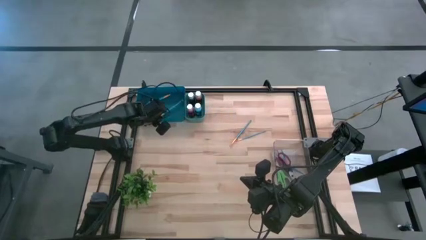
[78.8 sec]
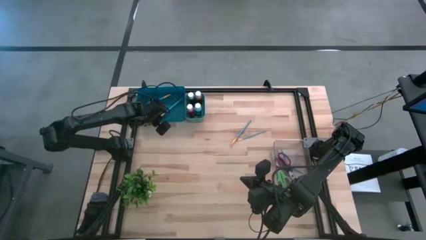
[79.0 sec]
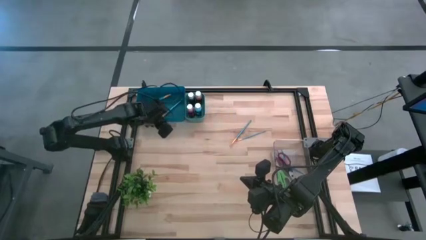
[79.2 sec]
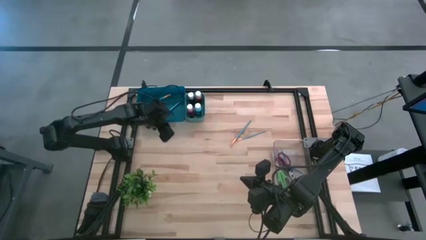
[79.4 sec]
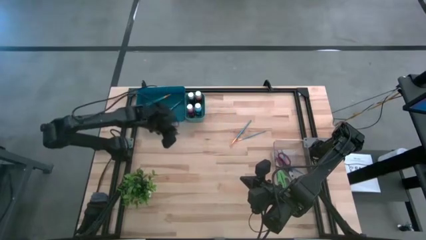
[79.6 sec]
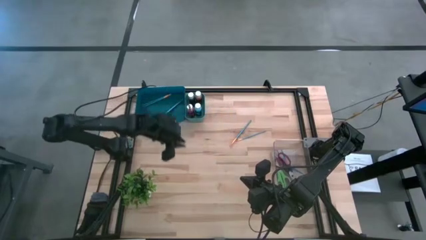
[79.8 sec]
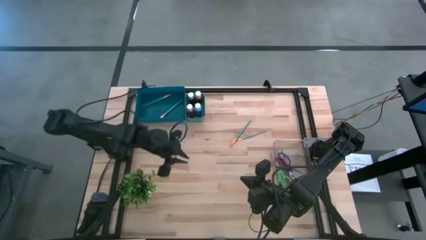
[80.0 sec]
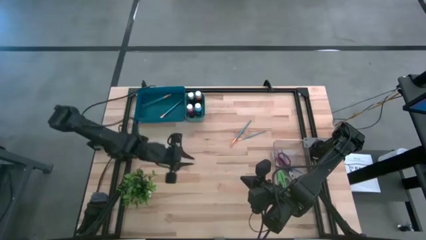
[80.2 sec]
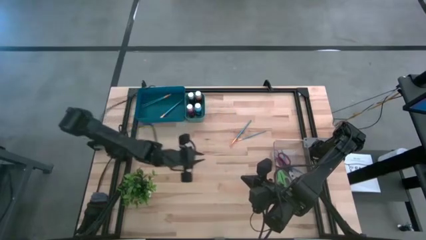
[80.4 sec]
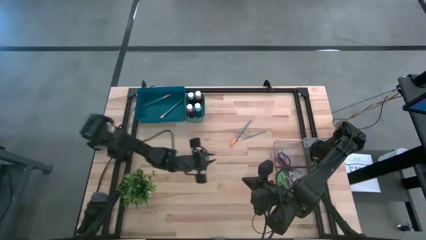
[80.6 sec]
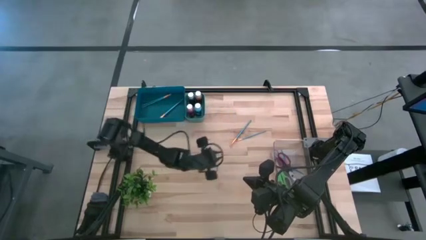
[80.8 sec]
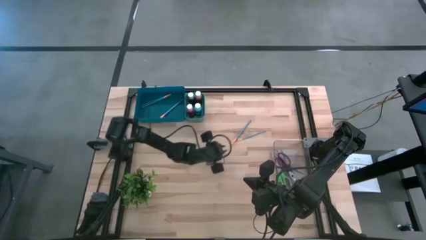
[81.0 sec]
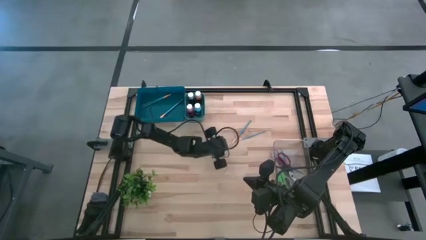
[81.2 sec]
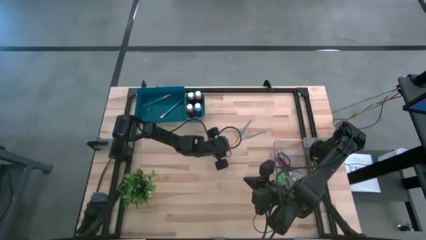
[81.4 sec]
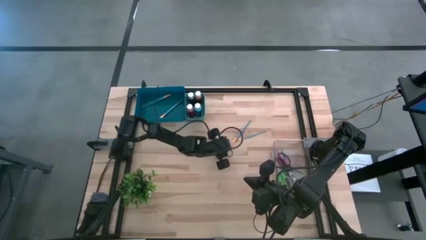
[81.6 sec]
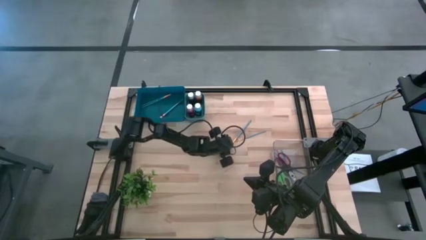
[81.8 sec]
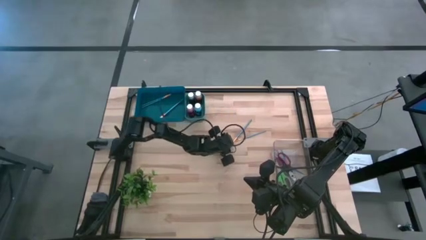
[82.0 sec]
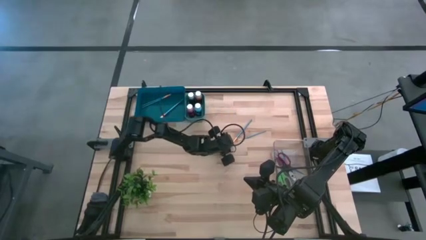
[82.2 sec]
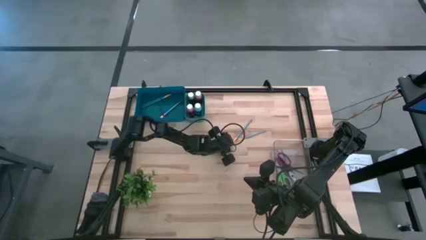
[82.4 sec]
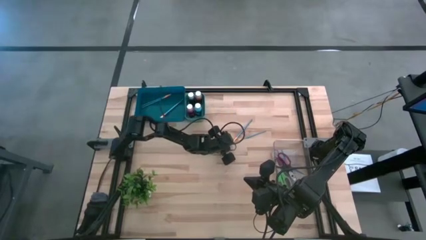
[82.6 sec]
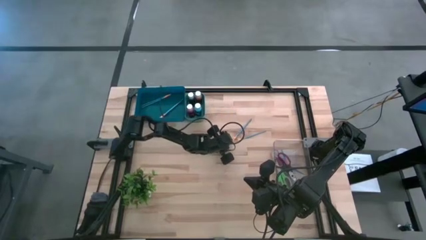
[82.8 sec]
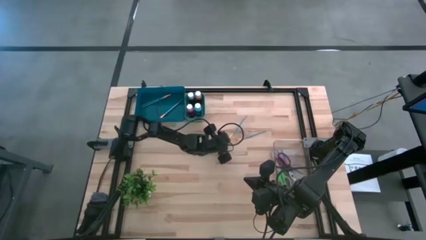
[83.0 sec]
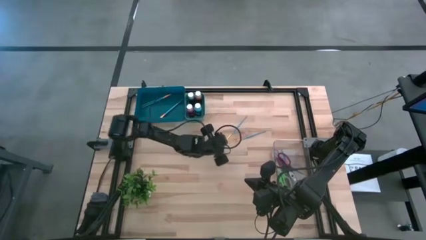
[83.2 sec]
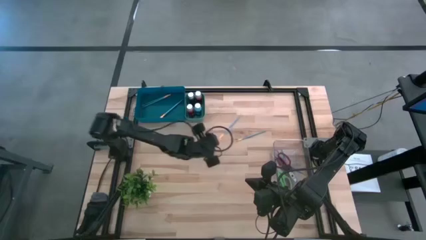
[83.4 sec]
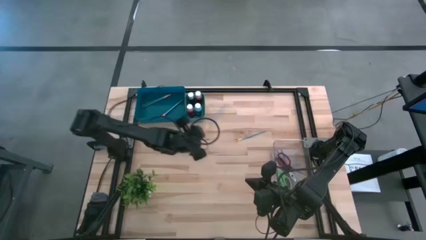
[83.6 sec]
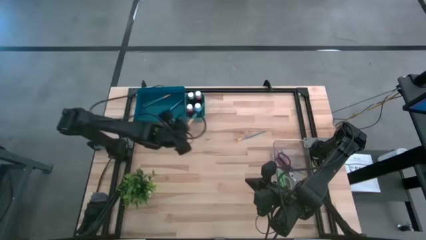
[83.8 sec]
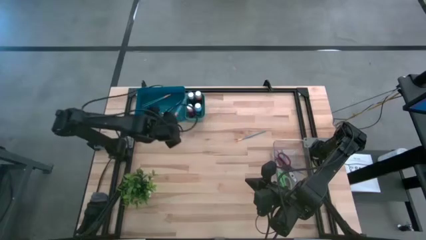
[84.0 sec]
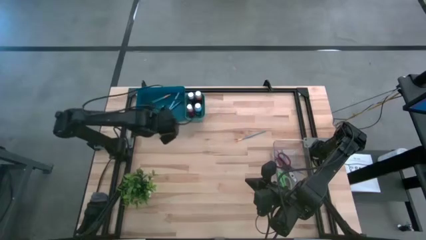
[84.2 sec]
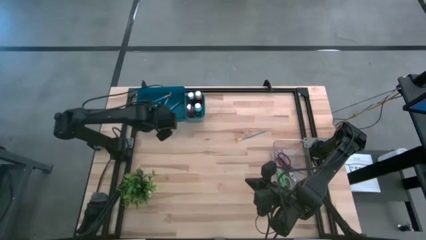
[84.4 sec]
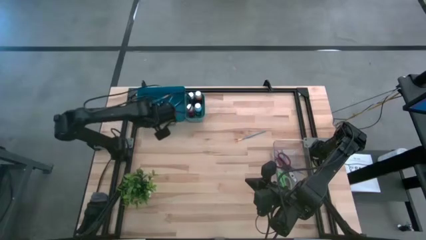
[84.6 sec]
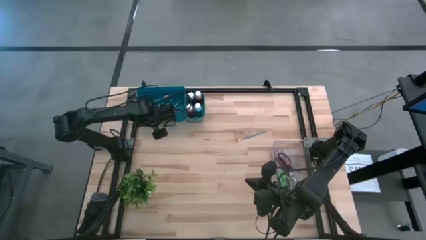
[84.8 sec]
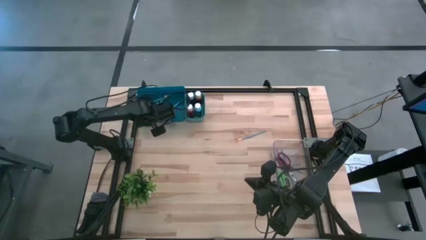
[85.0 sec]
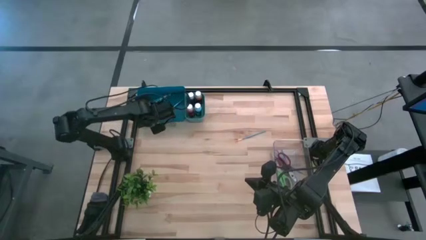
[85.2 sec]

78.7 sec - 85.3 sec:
Task: Pick & Place Paint Supplies
Put the blue paint brush into the blue bin

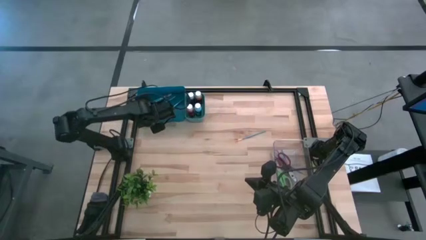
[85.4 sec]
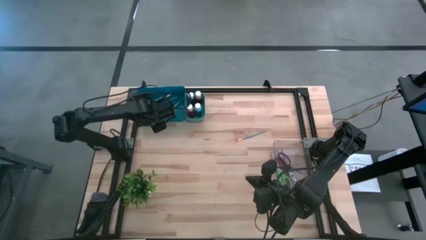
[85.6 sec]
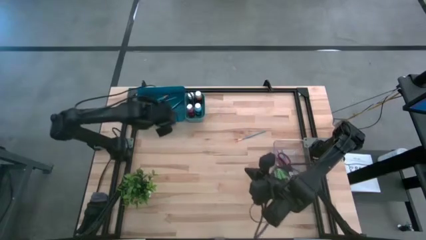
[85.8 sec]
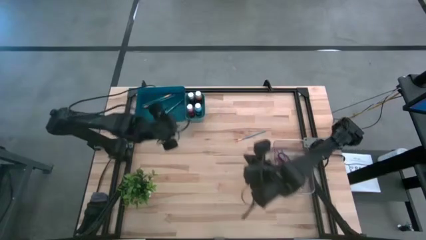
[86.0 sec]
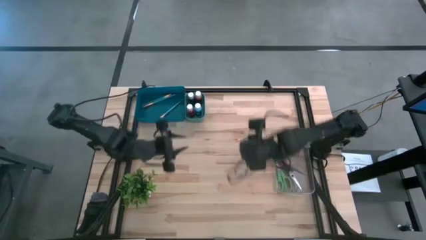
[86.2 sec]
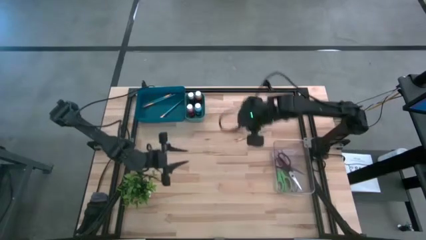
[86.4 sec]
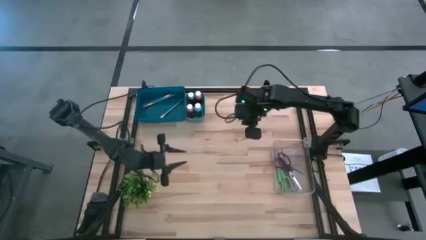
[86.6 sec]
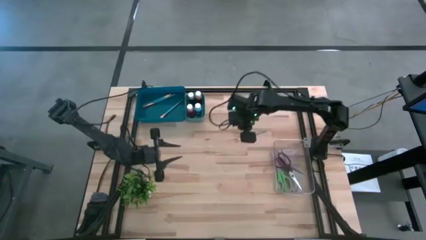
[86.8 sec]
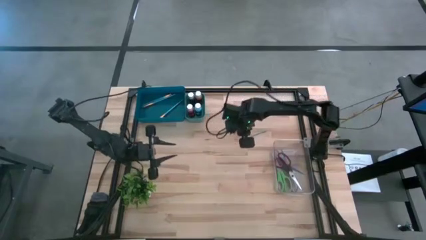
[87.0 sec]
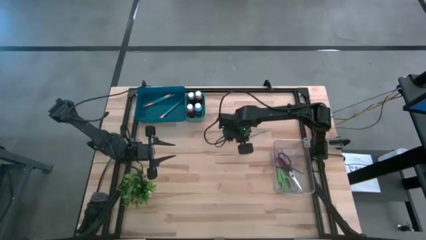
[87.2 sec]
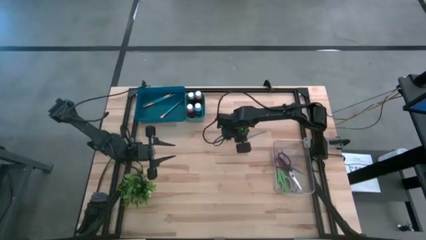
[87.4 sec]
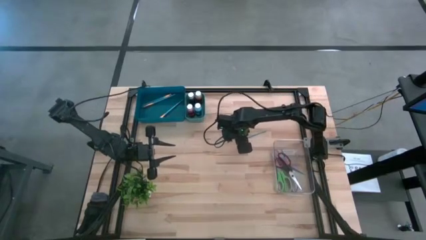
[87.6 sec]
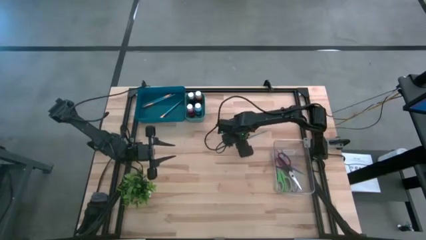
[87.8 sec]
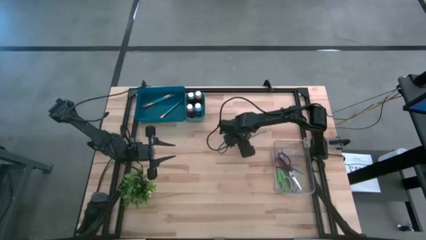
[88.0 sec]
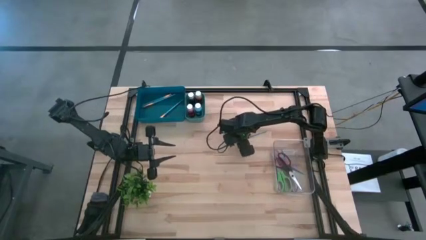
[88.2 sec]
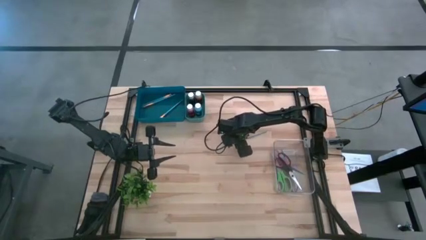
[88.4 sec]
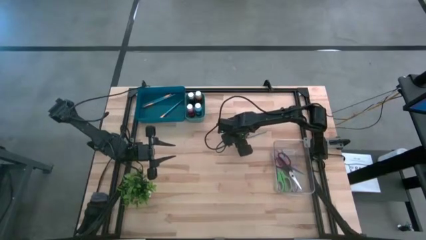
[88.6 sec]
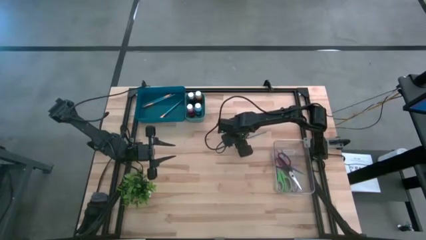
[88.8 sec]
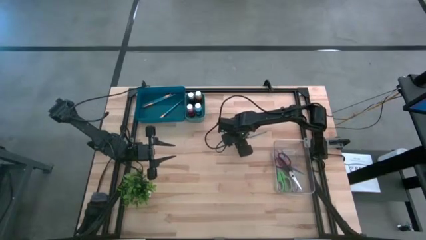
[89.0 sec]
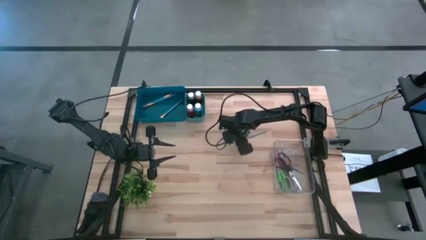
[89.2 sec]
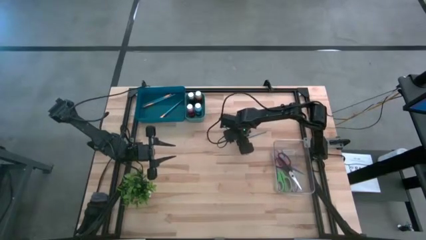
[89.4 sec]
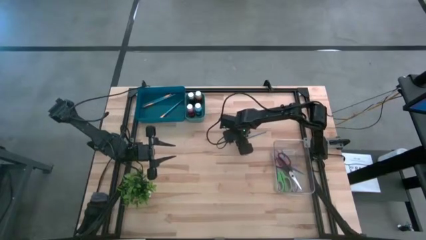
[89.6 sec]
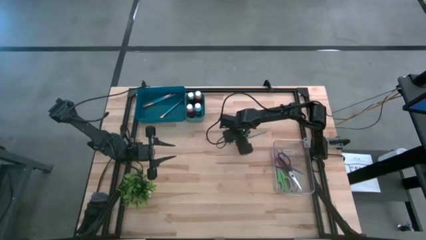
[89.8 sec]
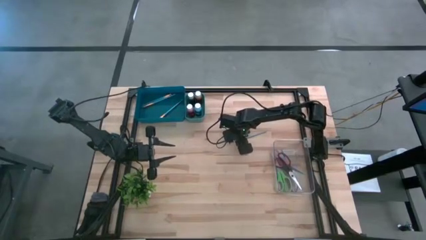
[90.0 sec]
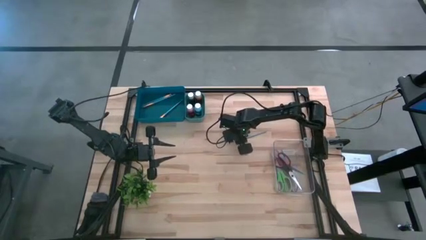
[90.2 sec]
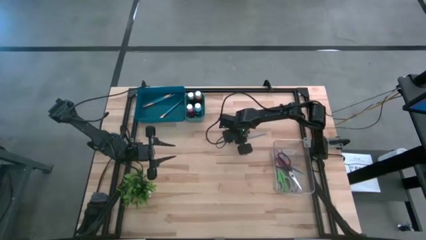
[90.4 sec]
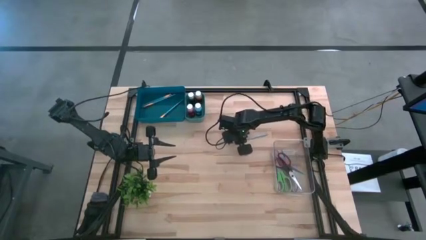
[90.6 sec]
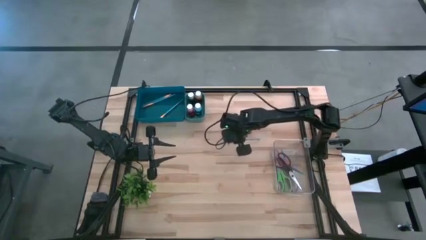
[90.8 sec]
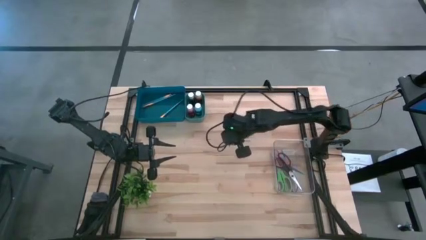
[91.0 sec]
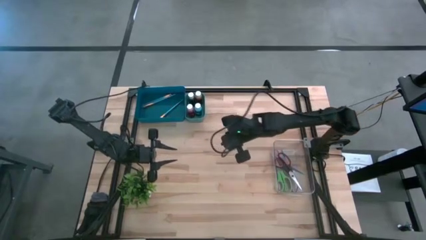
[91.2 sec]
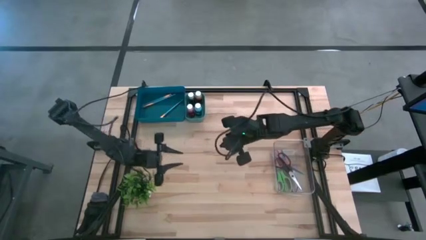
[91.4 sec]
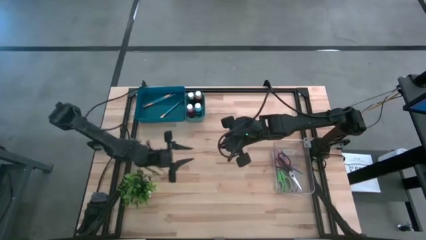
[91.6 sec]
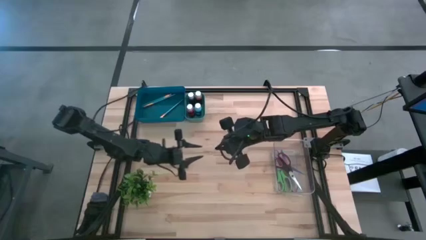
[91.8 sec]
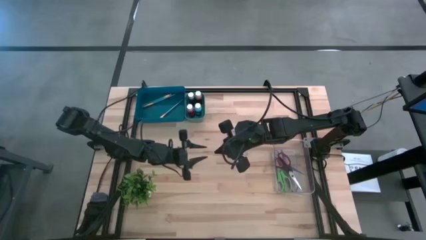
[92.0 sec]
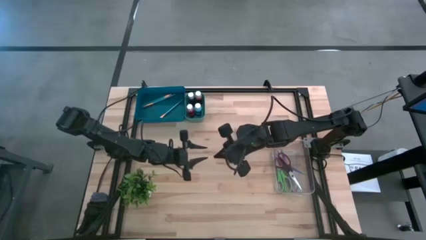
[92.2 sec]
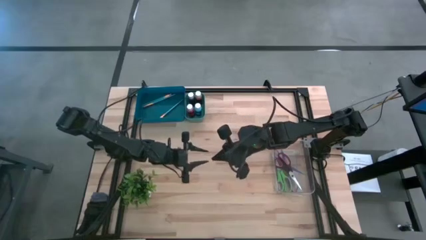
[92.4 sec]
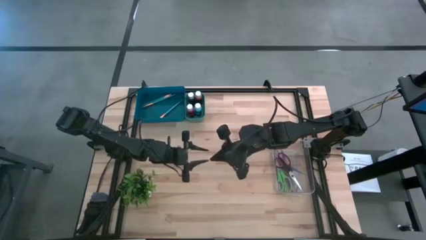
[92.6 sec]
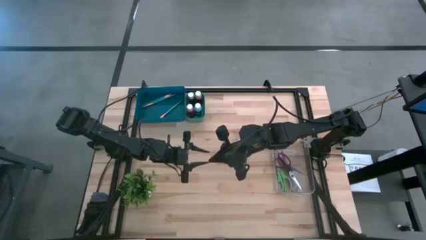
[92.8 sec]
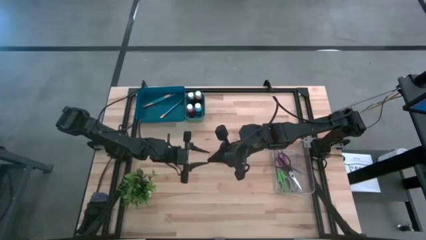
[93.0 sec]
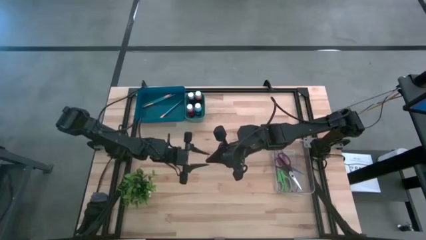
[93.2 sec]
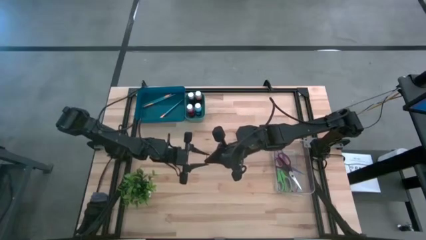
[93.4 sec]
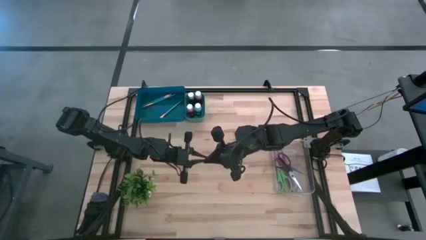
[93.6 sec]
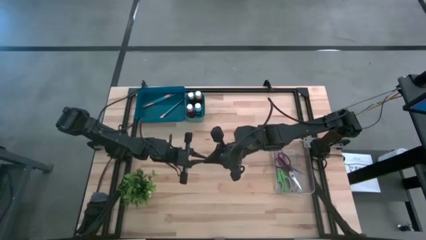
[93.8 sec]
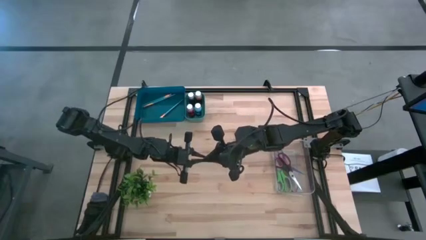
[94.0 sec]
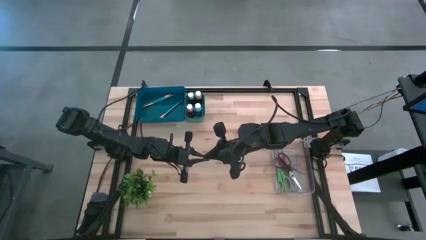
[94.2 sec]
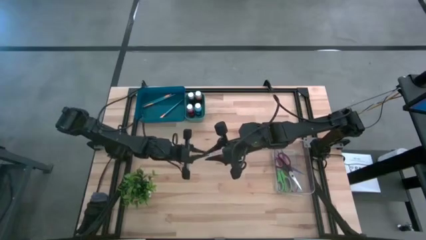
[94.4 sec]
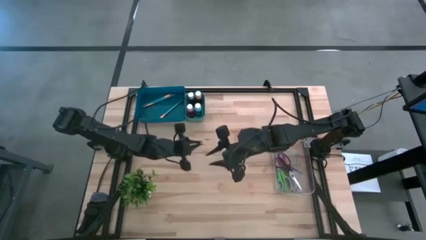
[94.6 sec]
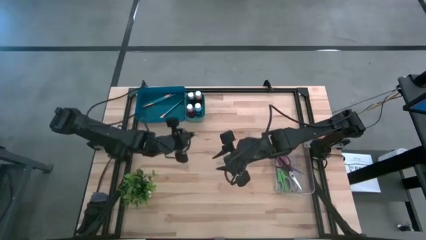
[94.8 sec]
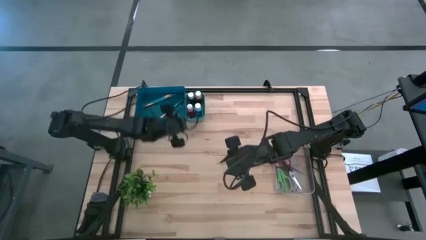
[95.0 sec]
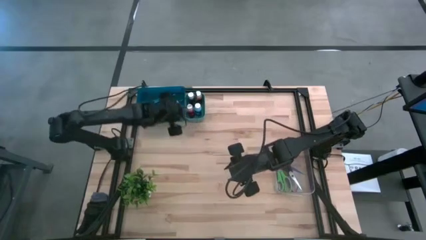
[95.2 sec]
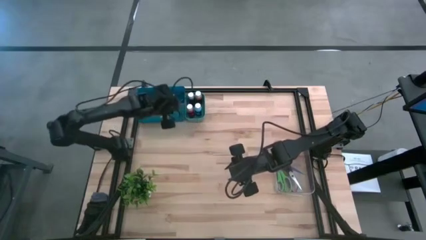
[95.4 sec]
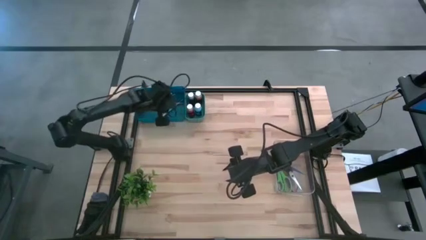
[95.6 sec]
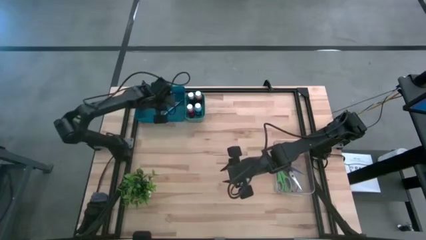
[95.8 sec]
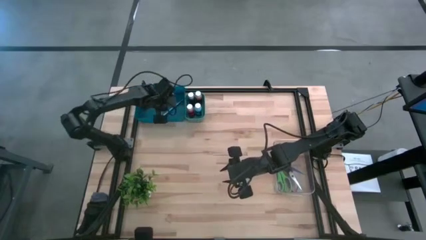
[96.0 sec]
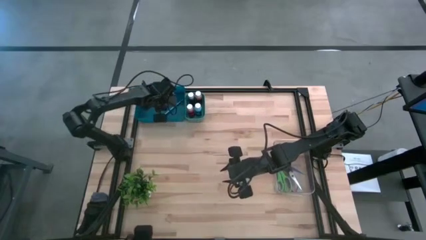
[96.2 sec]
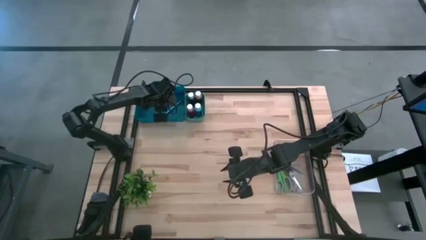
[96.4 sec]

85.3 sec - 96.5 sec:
Put the blue paint brush into the blue bin
